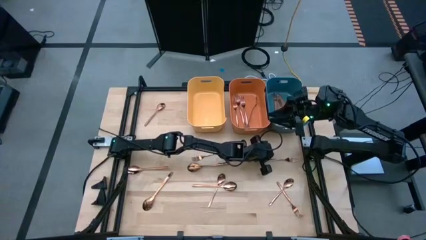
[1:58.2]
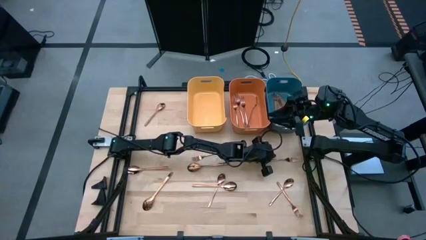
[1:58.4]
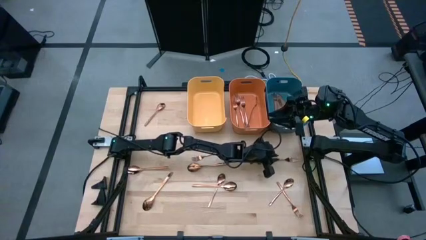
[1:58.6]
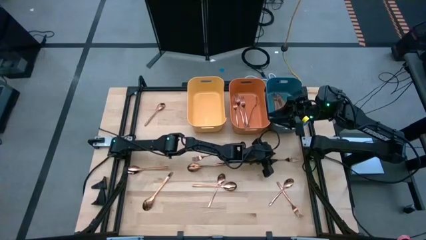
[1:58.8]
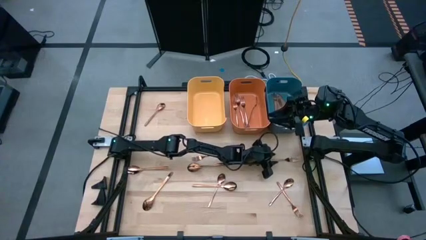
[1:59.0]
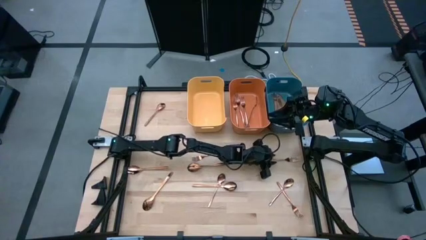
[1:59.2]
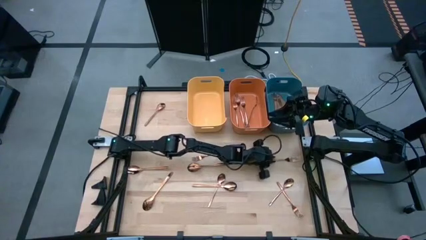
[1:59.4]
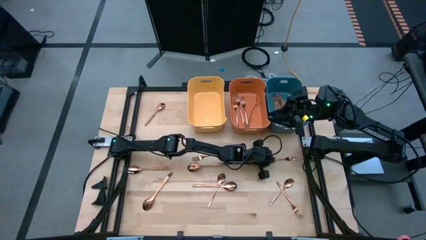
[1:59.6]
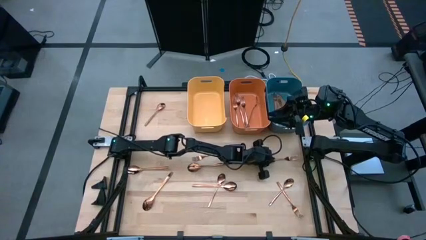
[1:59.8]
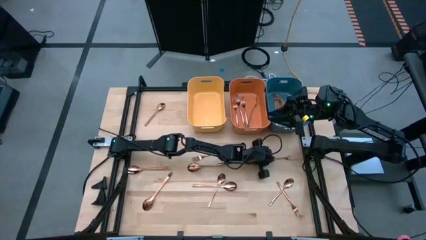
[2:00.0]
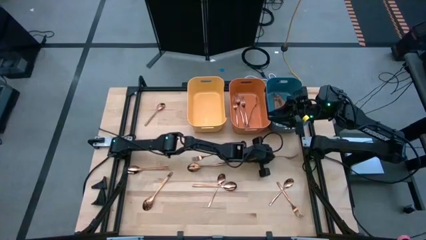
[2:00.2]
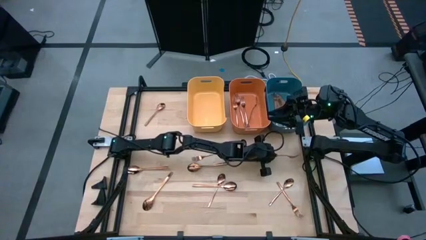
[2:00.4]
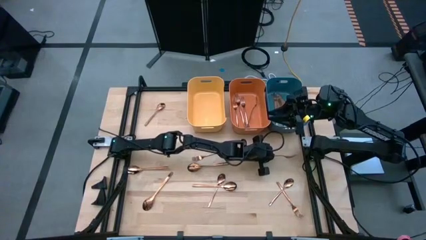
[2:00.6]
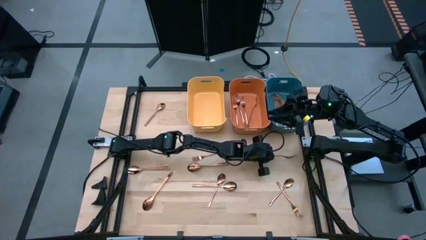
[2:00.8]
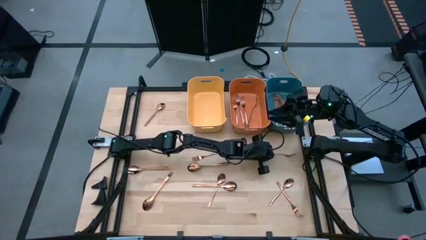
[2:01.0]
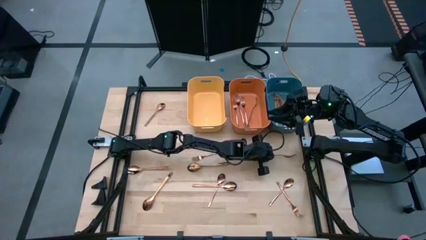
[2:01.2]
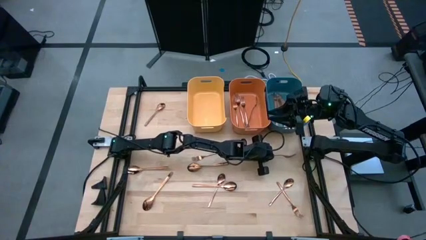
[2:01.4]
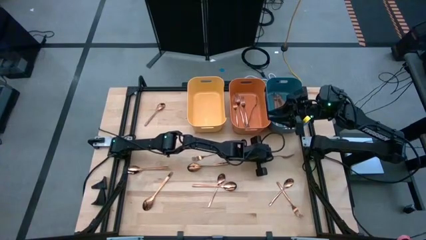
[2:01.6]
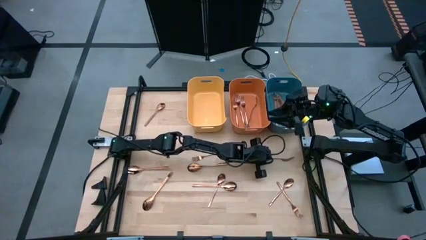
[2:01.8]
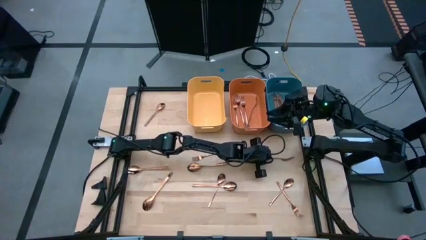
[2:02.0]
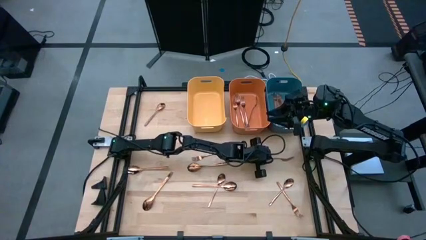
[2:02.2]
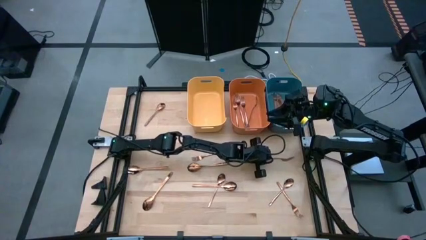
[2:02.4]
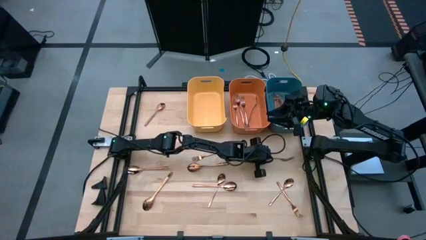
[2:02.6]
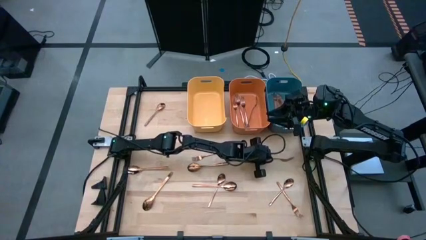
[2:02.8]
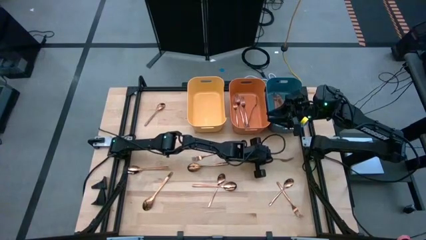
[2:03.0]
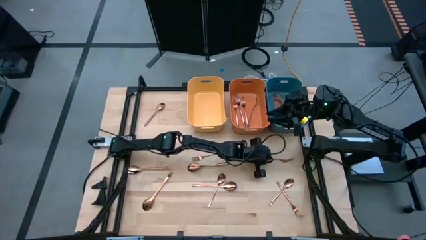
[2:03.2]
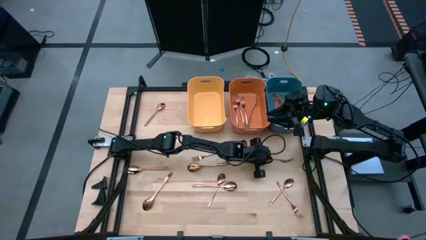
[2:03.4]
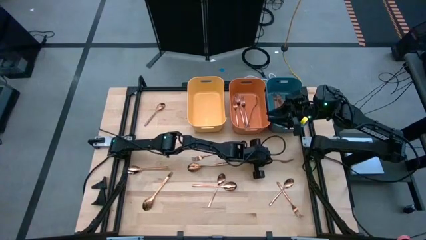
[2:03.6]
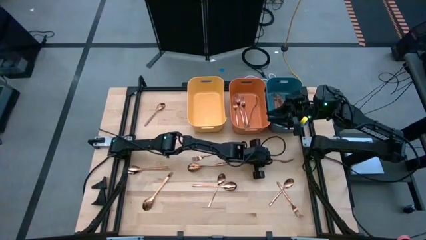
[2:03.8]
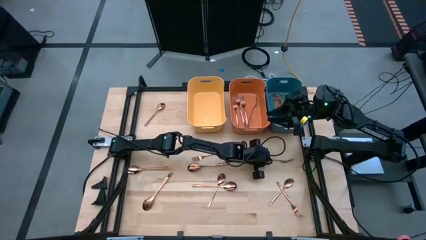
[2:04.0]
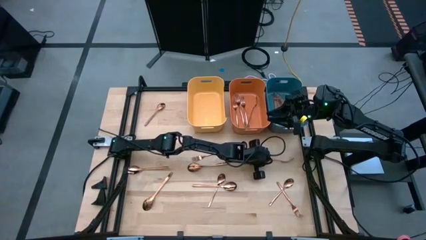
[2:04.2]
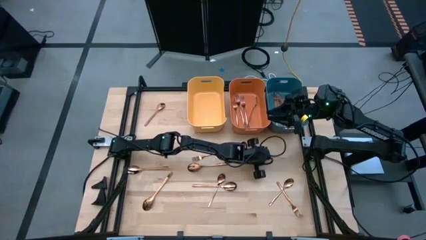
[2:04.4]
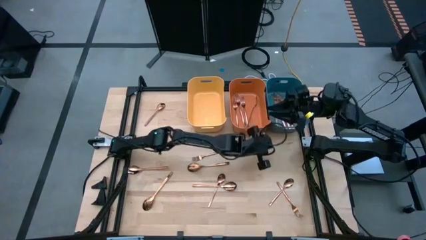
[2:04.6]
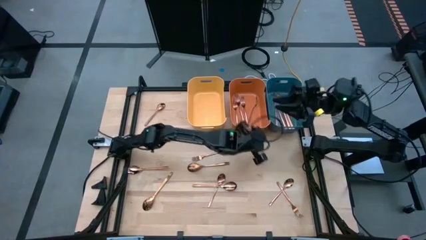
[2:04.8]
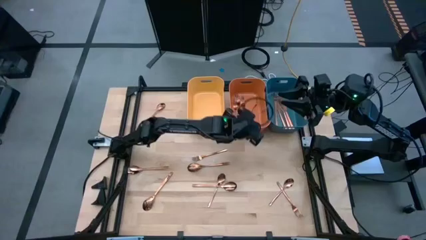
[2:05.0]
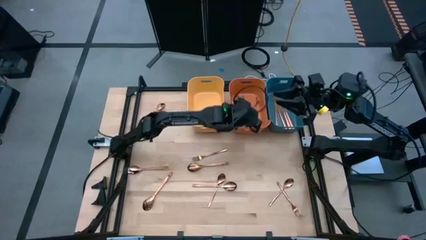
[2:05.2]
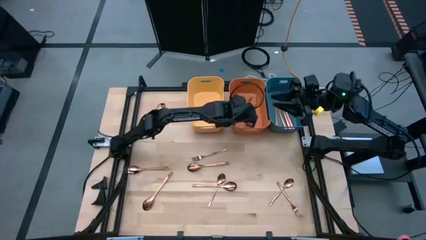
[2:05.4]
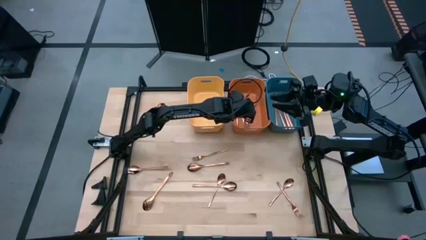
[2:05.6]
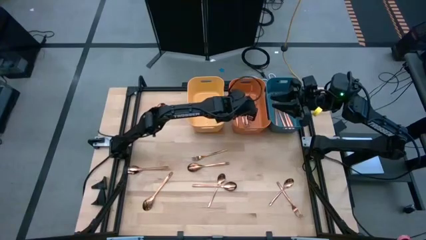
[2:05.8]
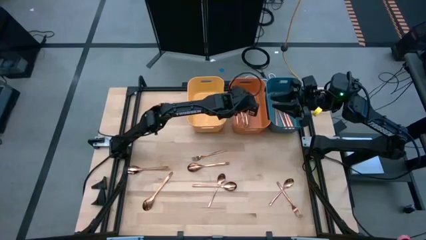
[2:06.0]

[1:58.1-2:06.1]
Task: Sort silverware
Put the copper fork into the orange bin

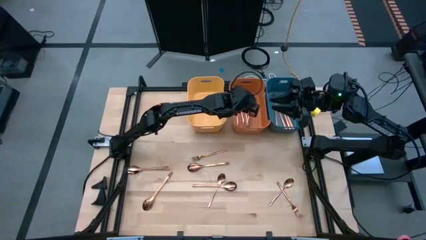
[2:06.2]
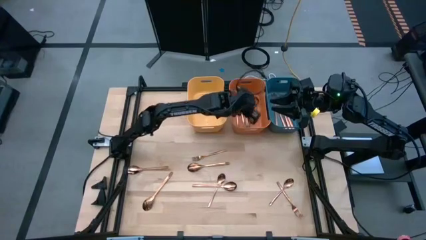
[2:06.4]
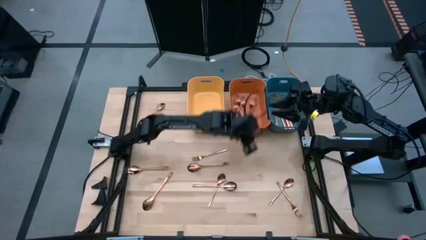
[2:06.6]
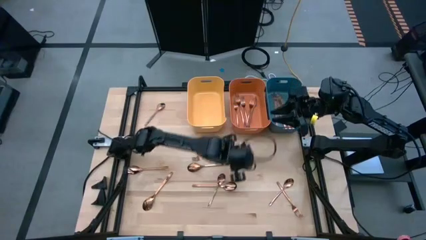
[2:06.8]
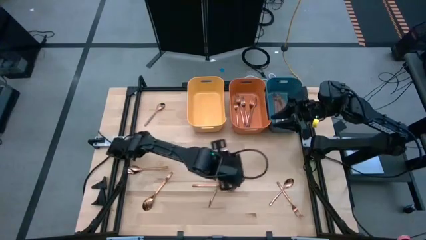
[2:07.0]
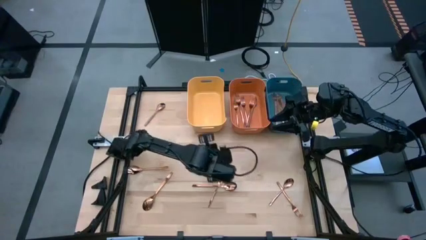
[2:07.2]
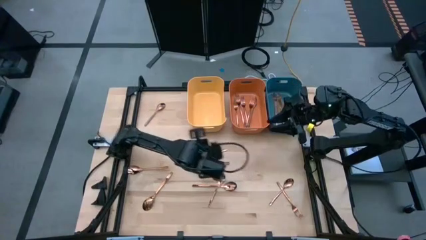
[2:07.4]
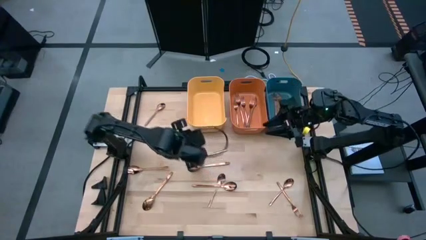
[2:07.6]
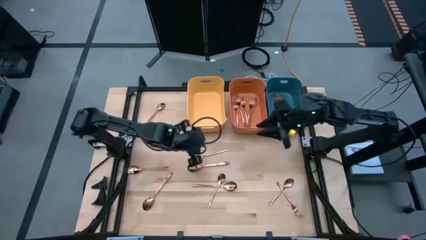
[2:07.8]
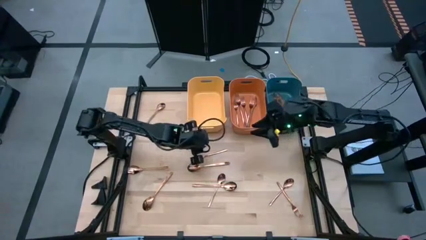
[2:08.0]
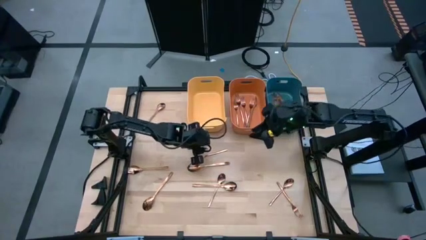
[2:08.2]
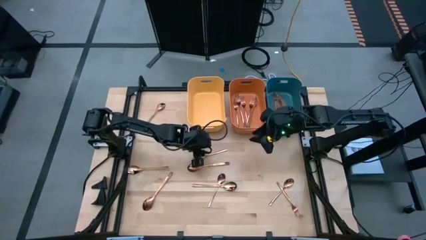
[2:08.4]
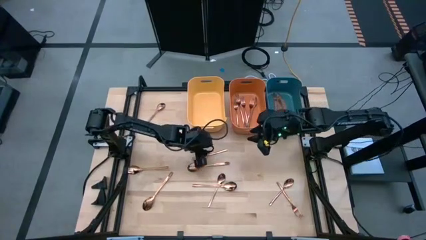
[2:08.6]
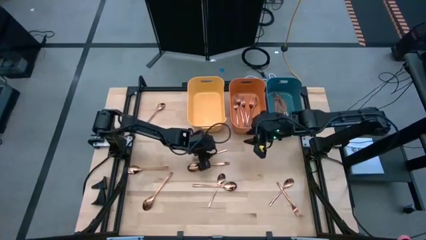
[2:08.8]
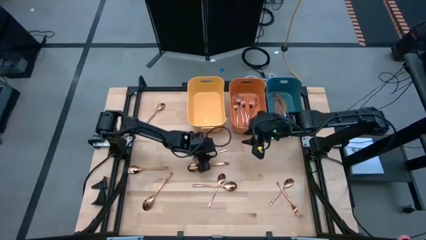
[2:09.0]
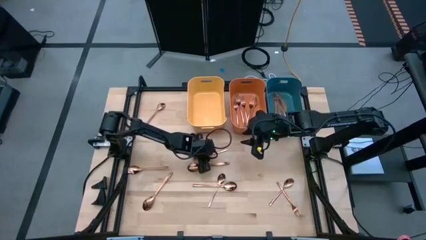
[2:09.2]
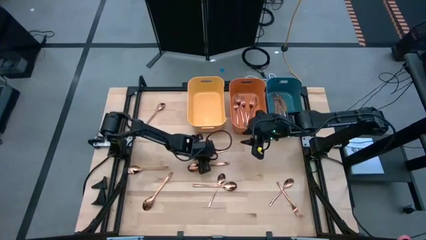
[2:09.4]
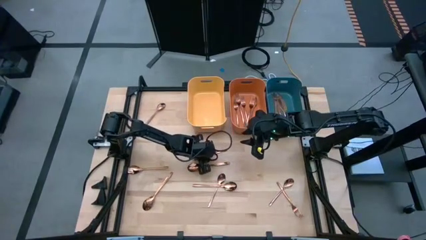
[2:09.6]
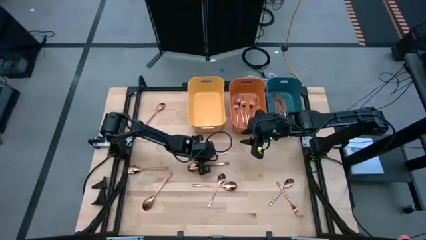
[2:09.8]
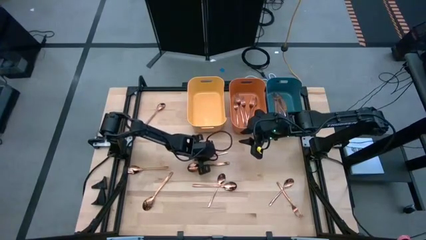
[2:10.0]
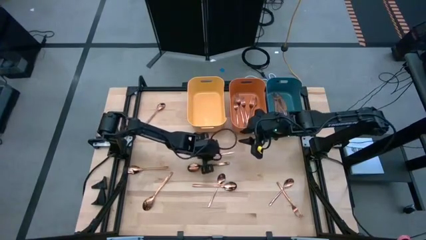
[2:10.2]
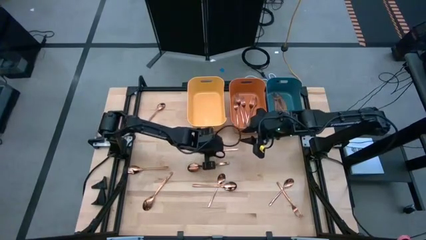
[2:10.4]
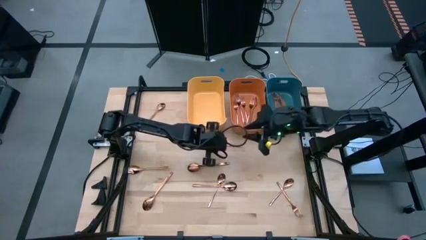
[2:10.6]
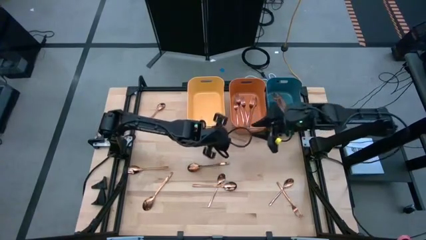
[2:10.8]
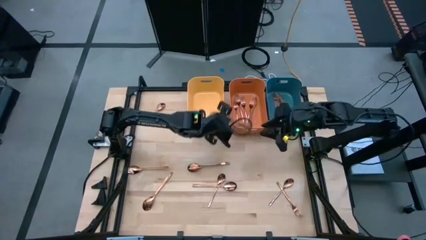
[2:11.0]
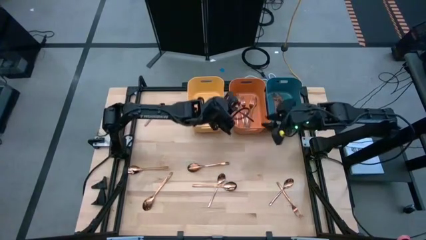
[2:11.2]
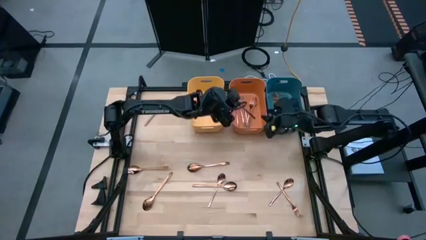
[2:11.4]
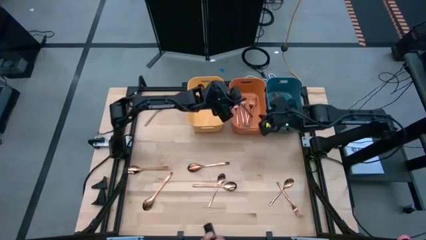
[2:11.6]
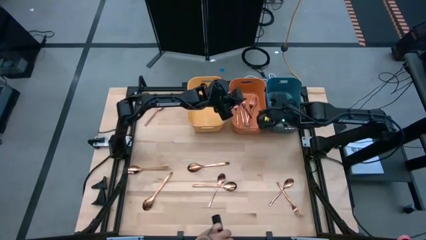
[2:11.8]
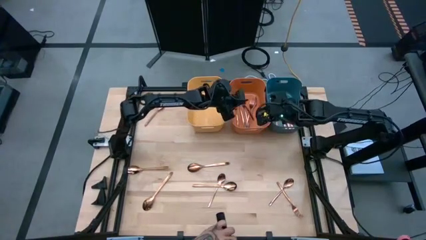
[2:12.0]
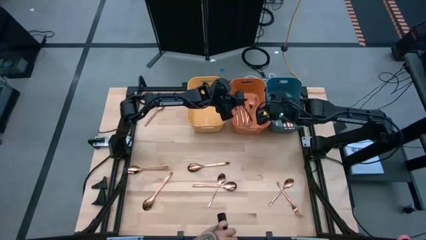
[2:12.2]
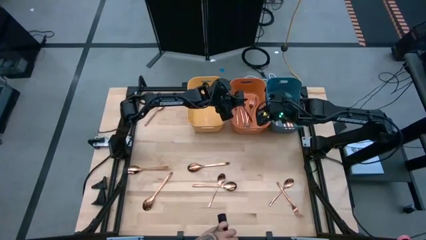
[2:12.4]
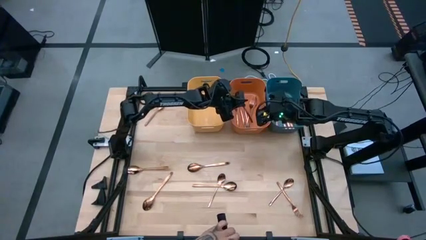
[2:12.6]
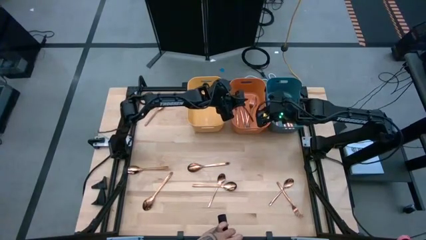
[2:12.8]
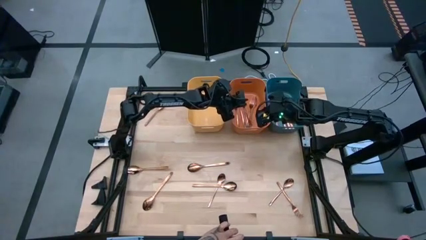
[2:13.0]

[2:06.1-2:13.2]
Put the copper fork into the orange bin
